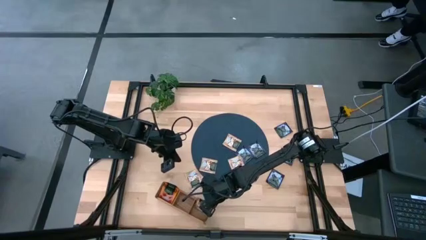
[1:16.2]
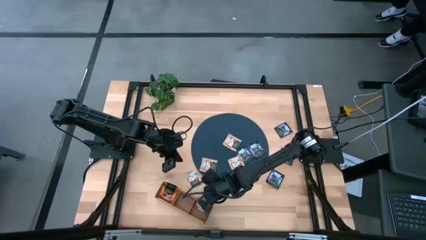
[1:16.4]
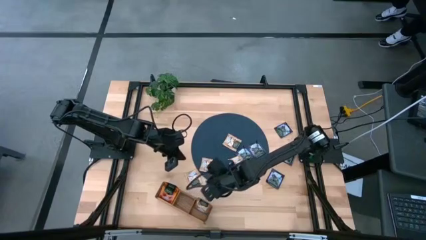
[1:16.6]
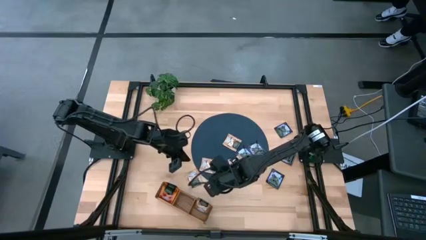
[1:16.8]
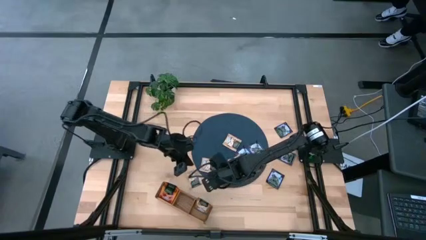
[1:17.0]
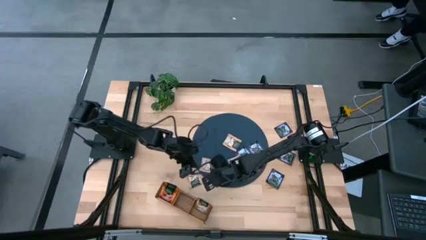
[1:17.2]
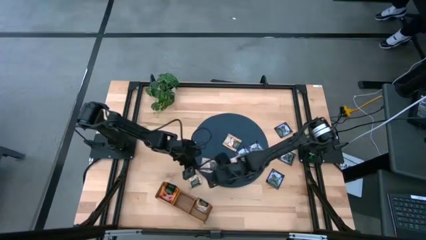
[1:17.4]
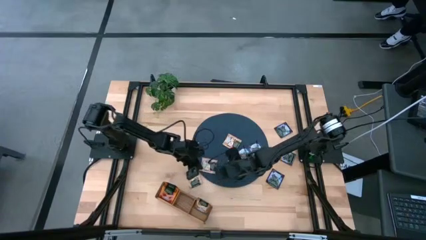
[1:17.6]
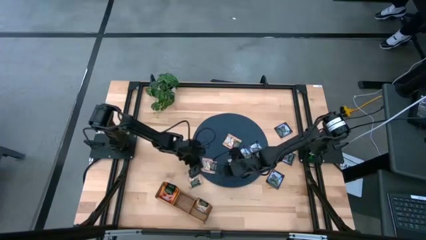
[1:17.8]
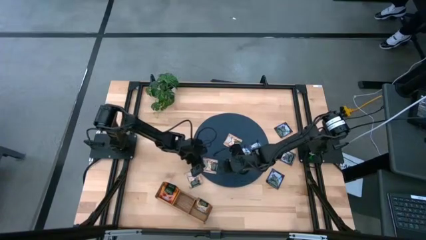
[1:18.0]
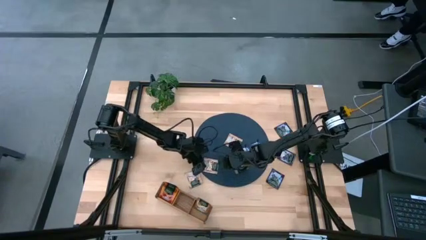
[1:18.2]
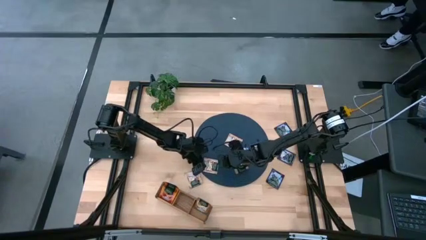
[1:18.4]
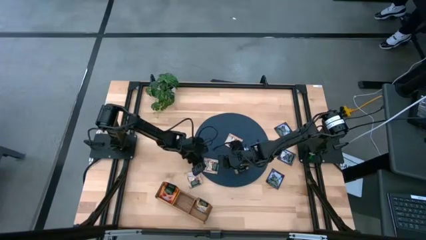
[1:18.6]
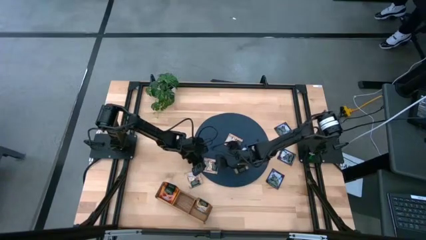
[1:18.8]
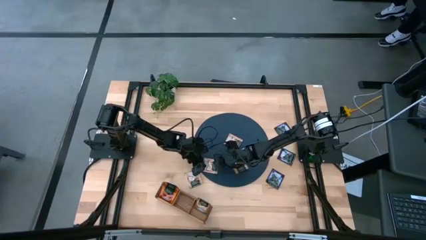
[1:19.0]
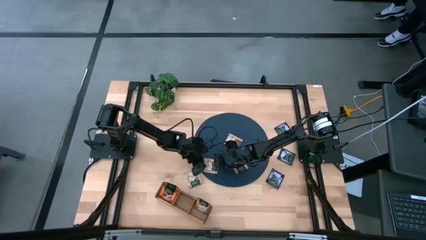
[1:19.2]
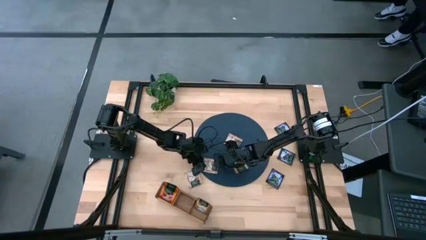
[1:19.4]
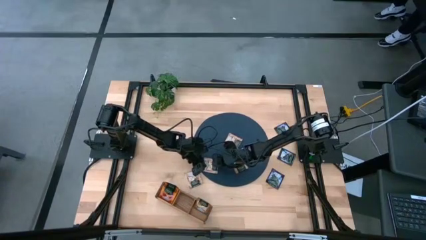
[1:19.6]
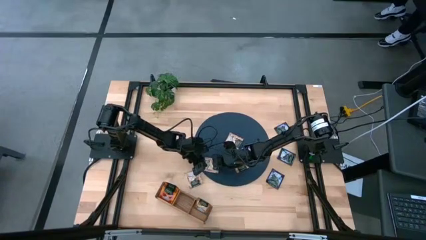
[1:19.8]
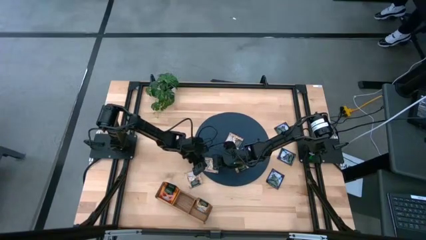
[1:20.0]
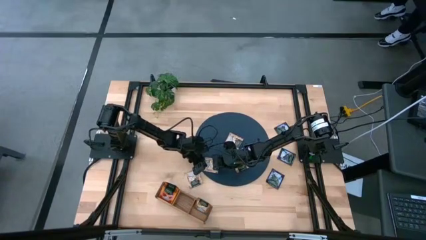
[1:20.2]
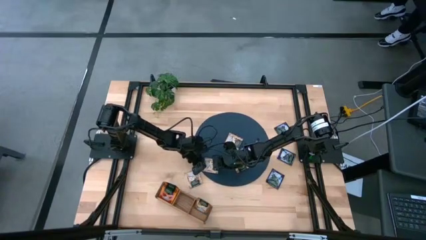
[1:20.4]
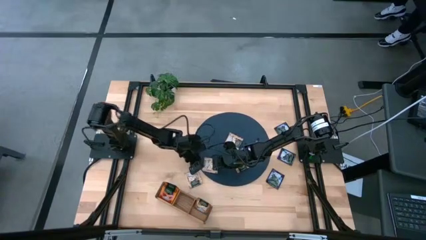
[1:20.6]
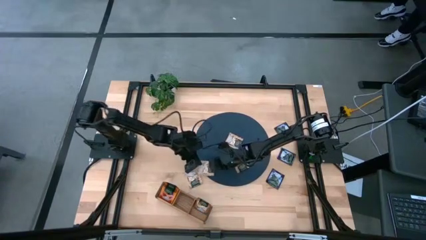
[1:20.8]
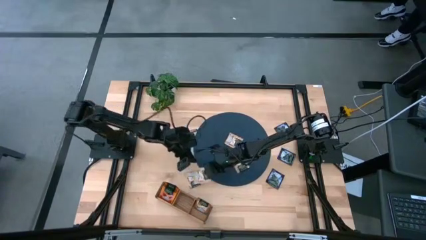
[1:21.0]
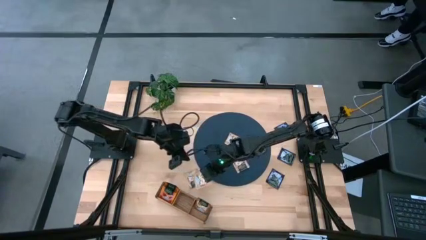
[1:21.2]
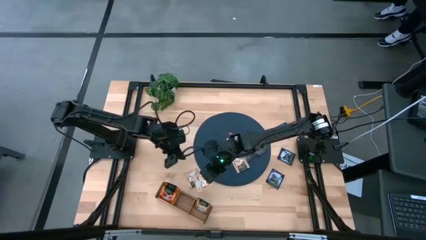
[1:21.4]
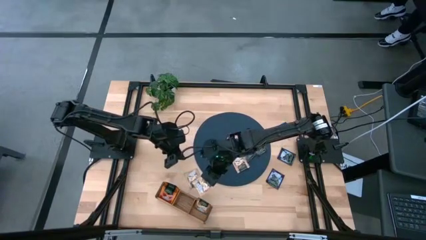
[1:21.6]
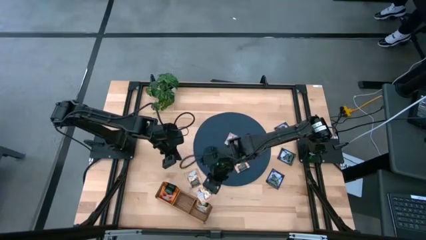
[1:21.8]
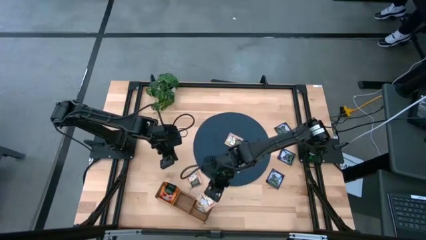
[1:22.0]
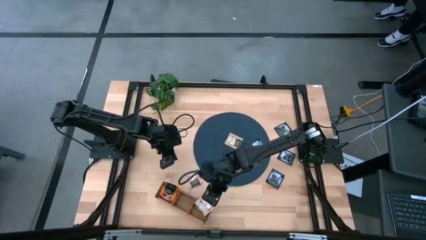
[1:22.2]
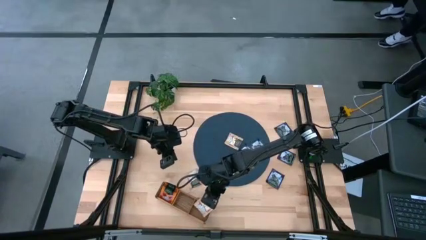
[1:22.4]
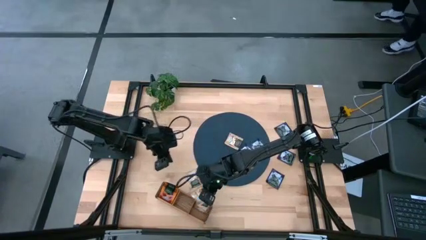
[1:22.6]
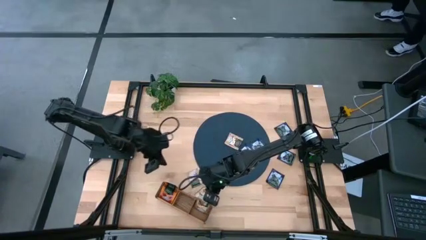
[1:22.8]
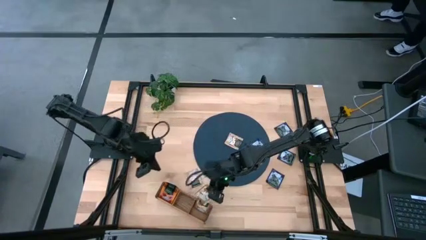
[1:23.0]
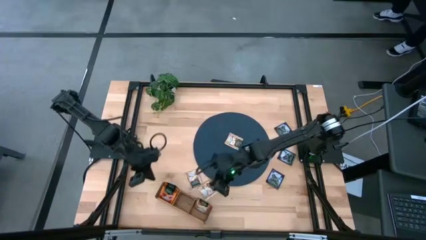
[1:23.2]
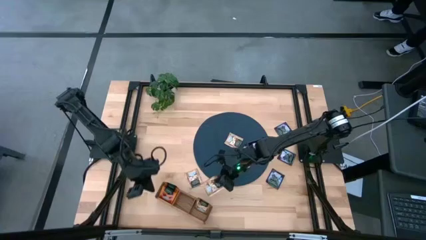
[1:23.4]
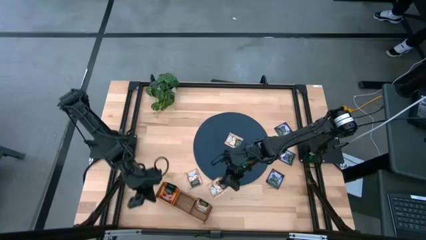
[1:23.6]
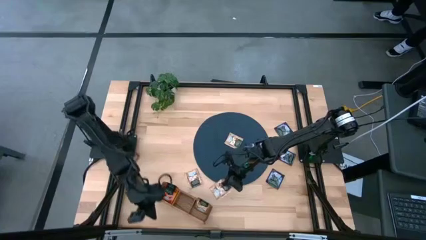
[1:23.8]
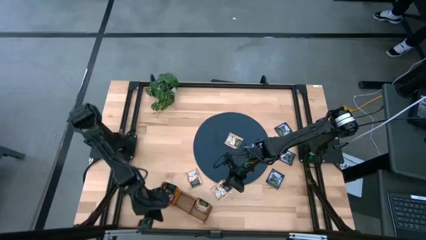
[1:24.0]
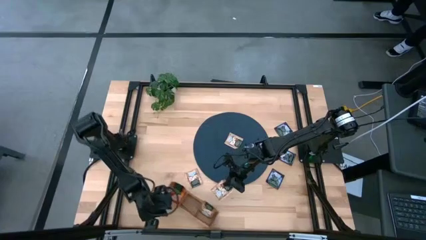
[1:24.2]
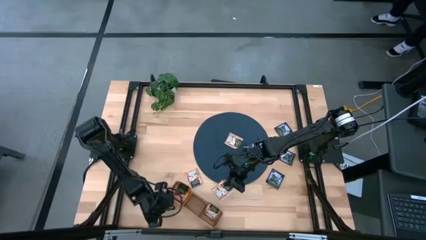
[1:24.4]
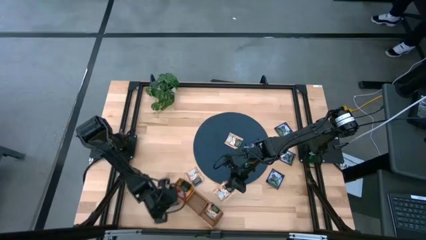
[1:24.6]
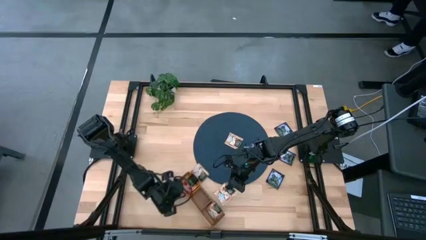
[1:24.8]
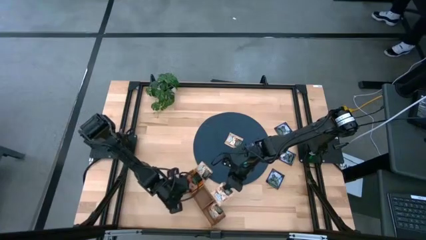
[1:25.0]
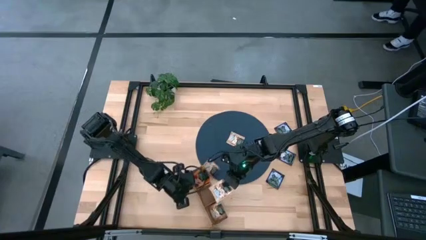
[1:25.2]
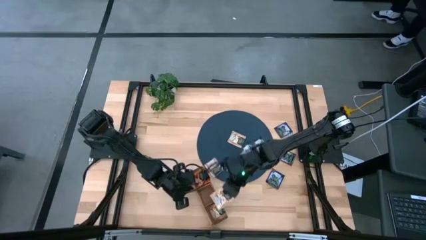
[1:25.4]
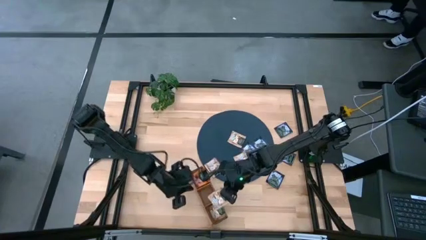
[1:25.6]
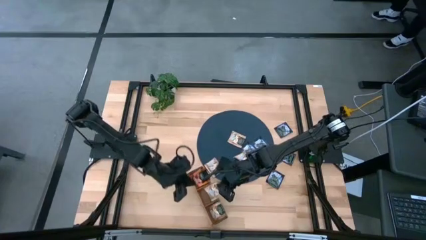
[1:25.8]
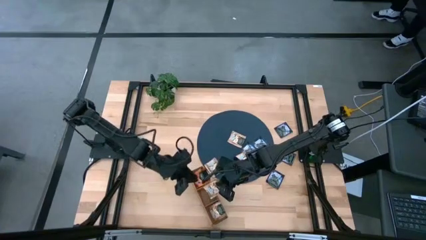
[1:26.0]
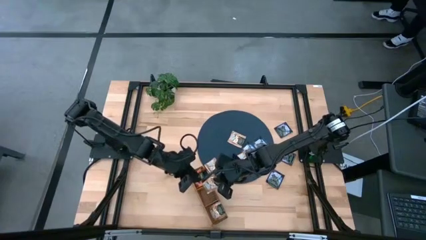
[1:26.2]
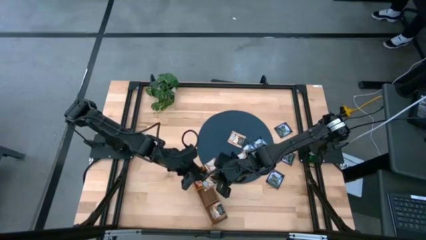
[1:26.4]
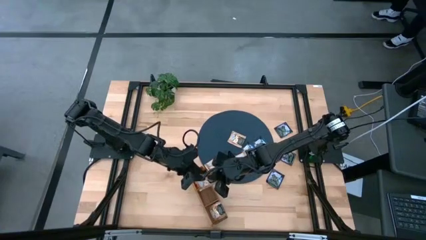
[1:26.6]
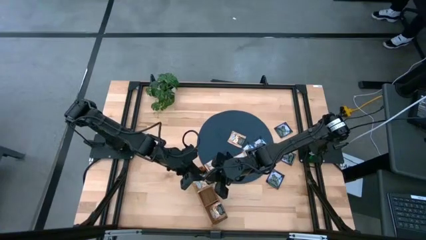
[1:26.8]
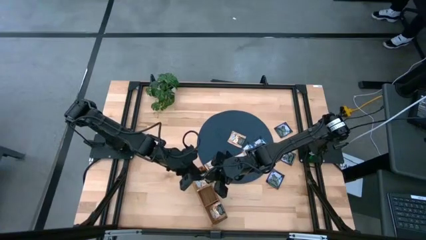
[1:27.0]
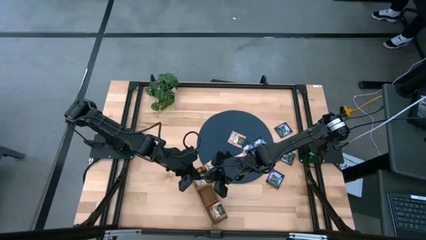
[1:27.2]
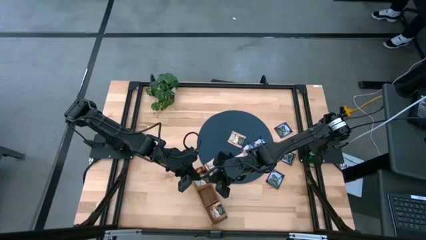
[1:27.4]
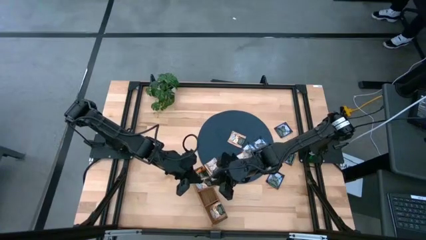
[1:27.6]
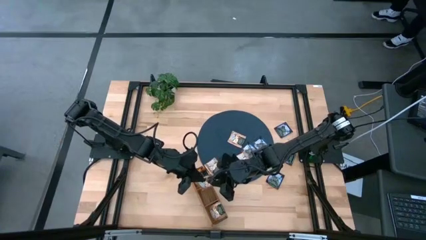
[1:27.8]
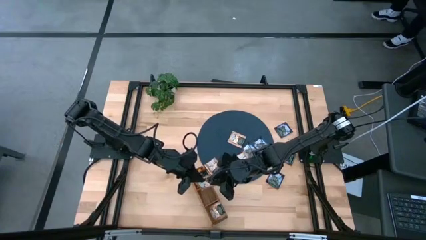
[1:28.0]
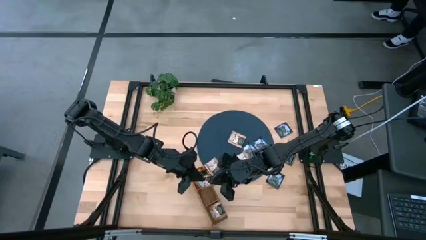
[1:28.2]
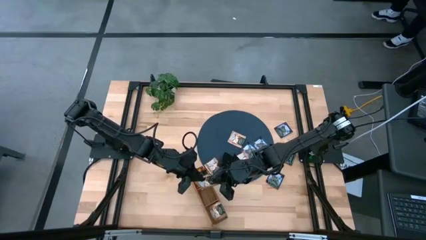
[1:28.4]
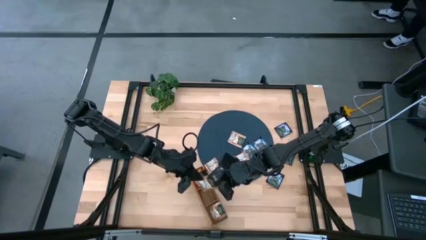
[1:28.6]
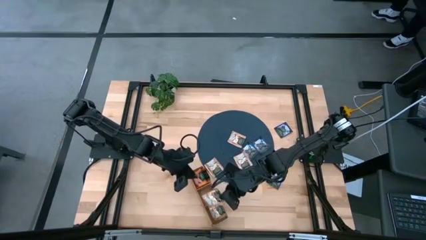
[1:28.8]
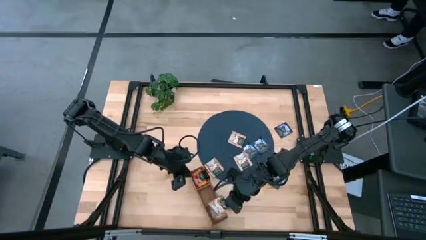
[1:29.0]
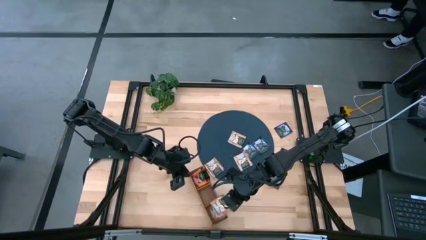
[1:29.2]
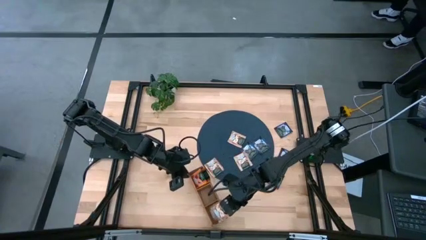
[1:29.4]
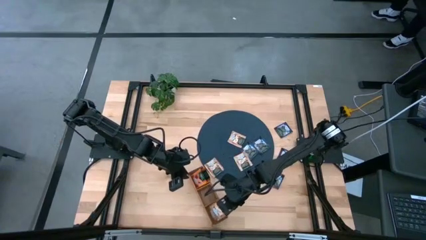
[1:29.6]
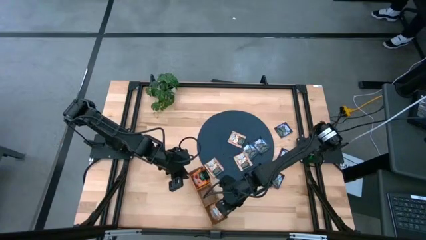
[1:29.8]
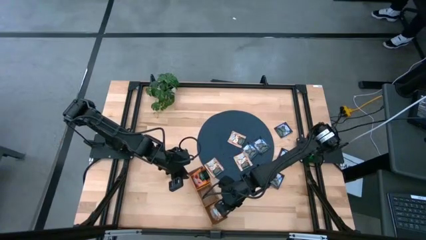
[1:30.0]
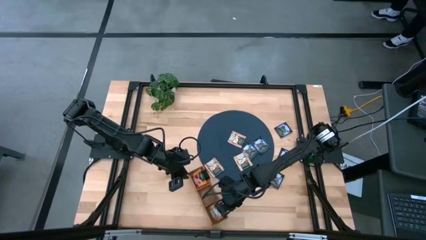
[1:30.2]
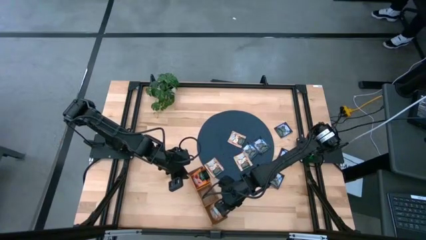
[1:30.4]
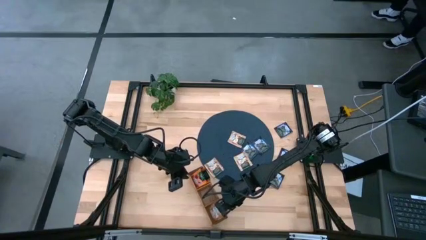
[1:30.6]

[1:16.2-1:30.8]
Task: Pick & Place Tea
Put the brown tea bag into the right section of the wooden organizer
